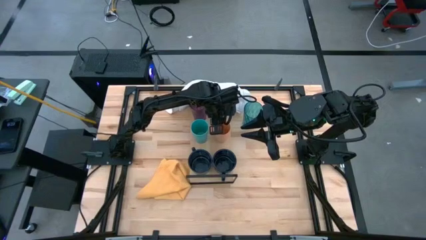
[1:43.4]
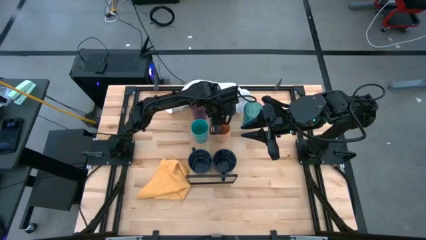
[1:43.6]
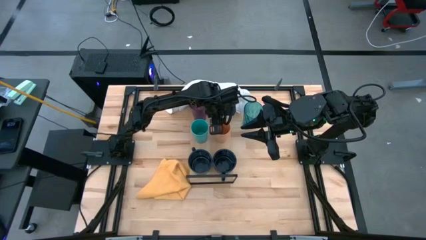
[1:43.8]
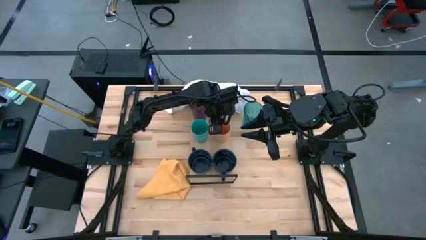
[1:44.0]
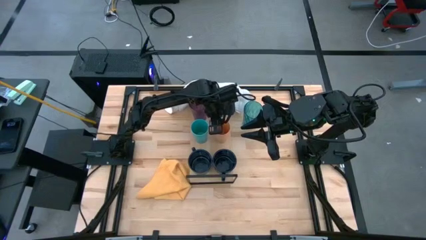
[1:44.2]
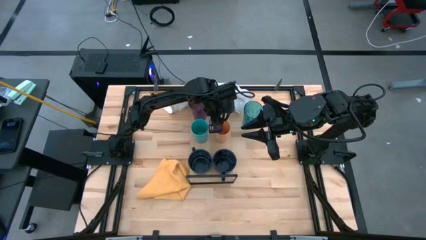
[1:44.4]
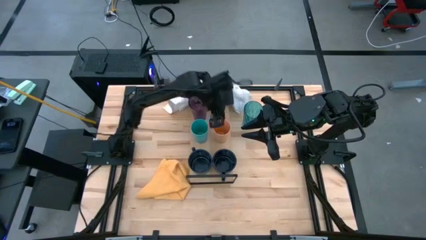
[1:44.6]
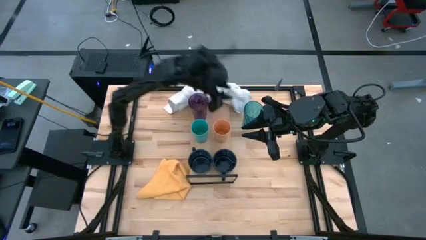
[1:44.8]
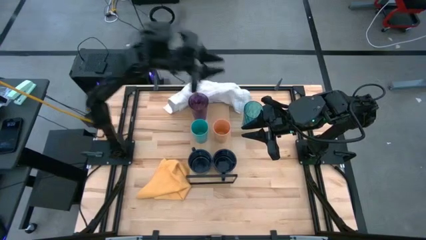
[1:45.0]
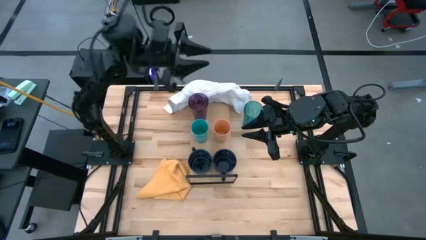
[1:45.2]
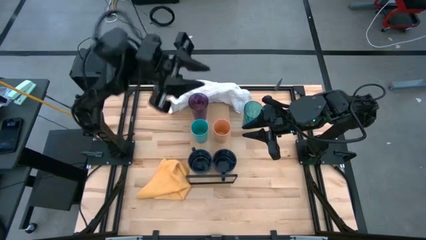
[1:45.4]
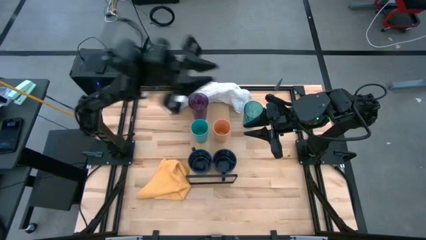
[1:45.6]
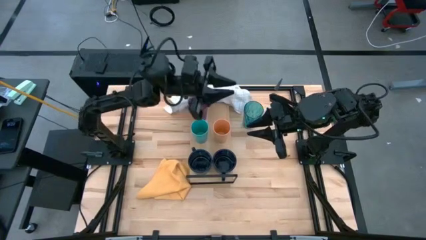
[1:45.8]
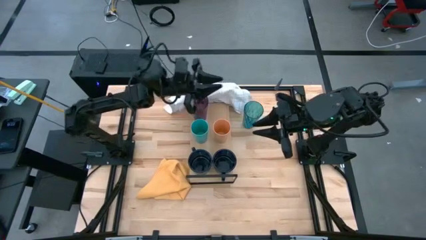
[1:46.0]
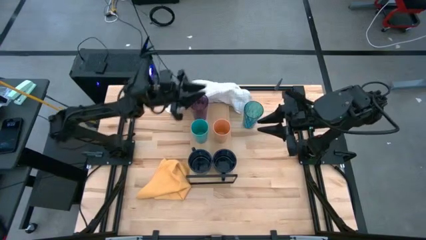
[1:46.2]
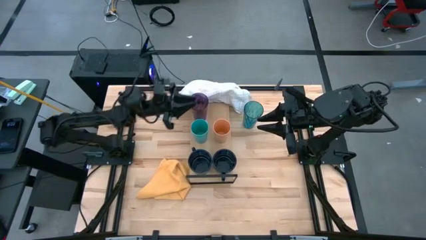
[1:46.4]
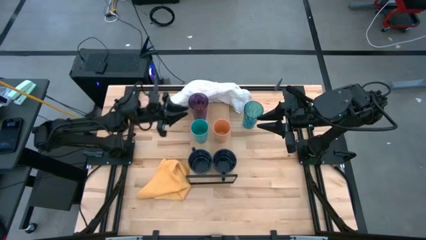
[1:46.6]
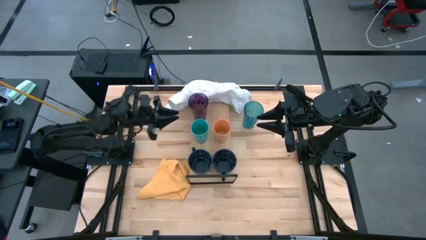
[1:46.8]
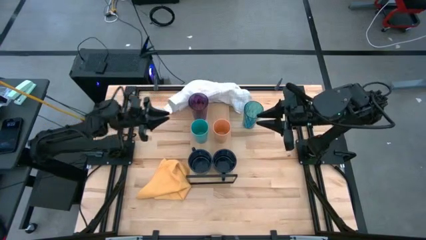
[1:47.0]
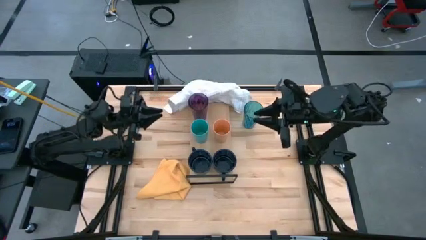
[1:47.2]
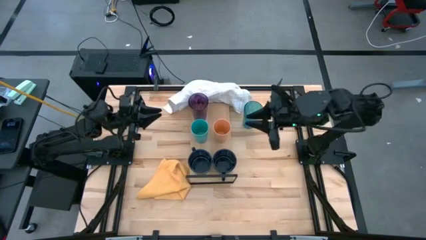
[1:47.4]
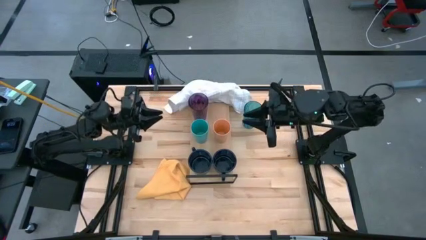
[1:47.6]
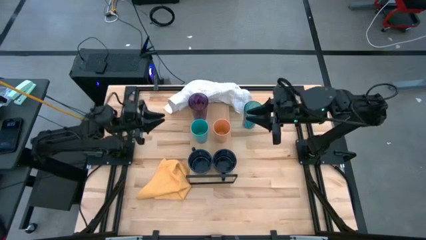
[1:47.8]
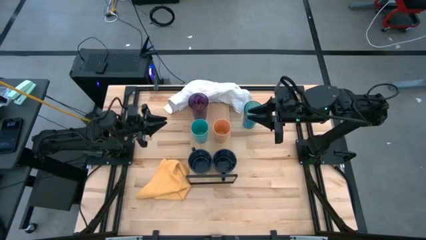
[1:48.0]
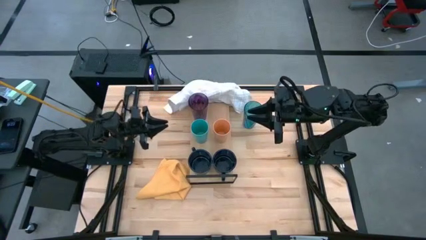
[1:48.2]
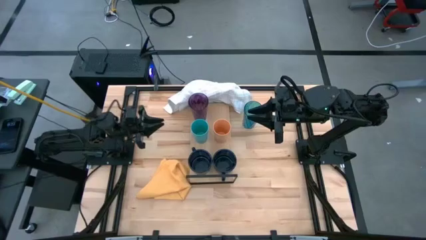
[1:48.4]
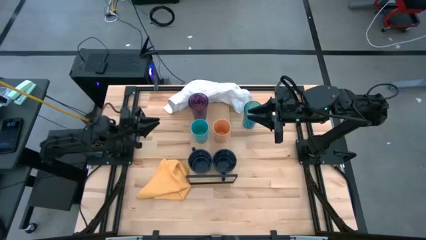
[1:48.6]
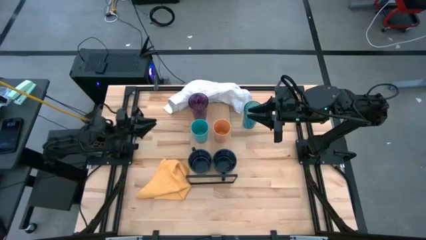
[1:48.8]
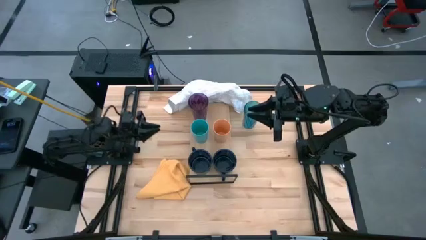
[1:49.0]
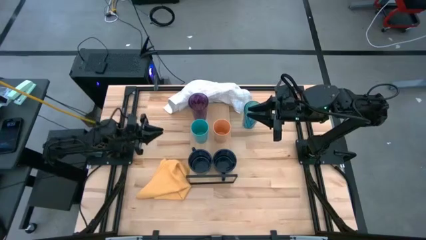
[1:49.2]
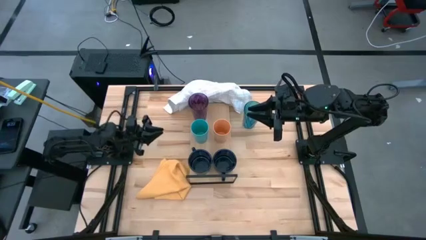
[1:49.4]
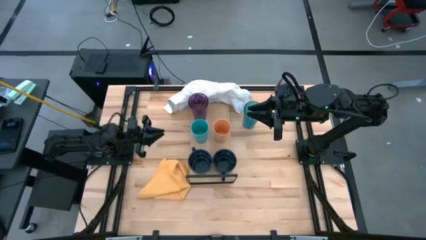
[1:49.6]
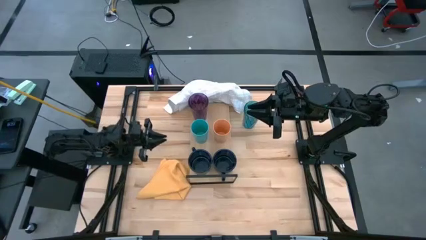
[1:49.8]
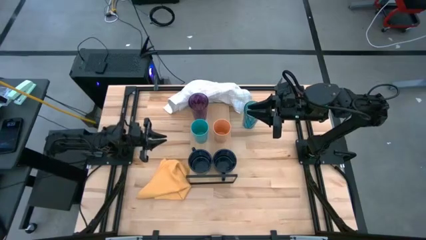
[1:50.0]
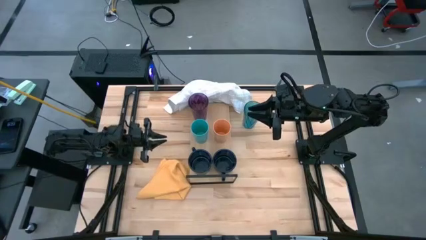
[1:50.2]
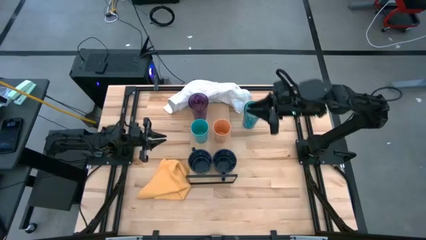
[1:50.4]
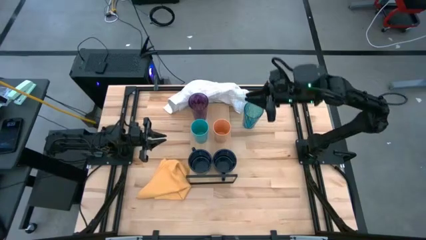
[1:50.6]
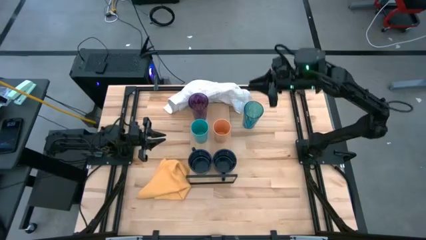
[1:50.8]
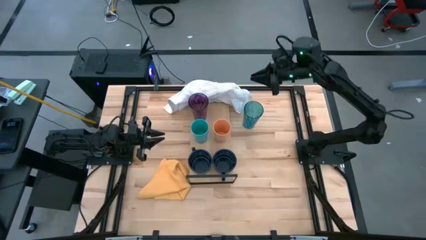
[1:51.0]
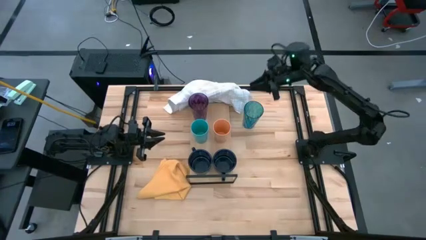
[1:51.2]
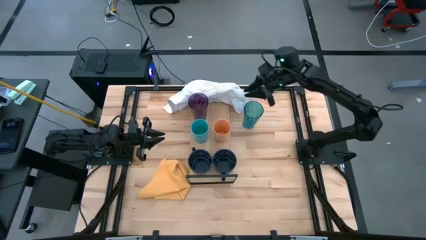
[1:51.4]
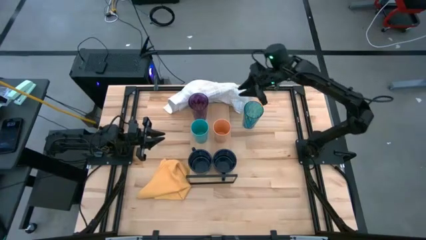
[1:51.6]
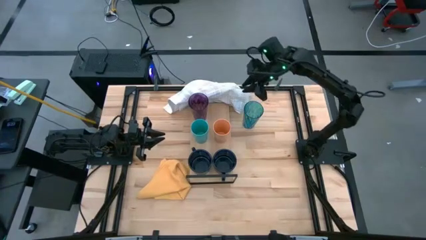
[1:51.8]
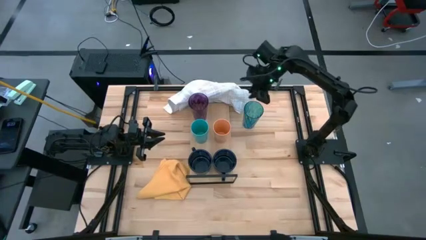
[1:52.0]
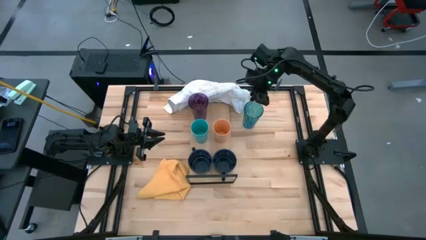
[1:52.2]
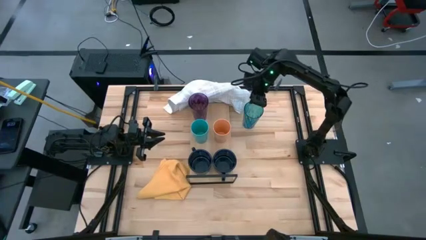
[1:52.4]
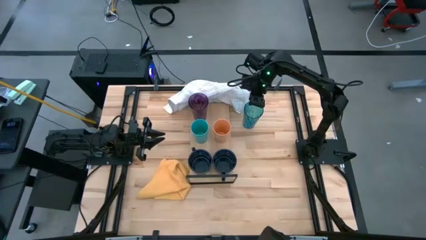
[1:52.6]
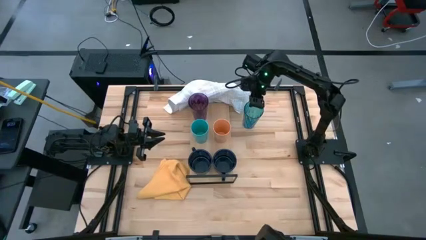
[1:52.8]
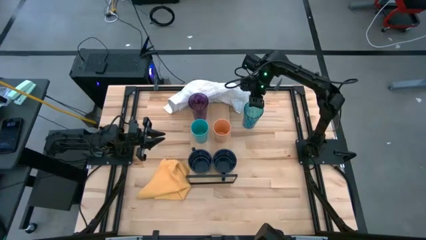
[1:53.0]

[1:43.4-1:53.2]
Task: Stack small to large cups/mugs on shelf
Put the blue cup on the shelf

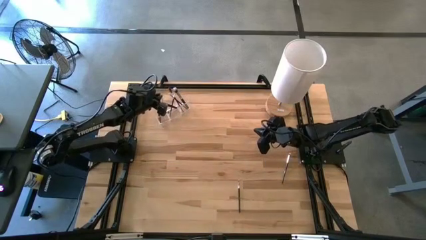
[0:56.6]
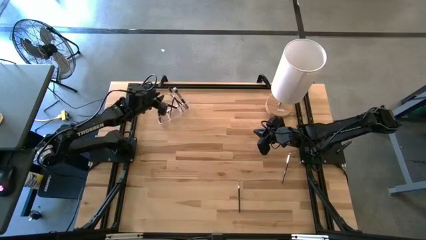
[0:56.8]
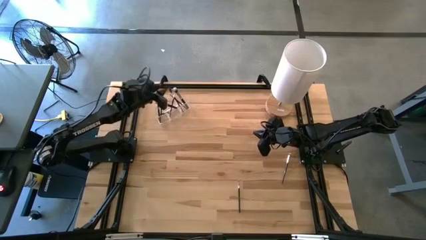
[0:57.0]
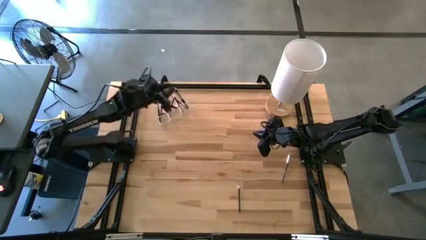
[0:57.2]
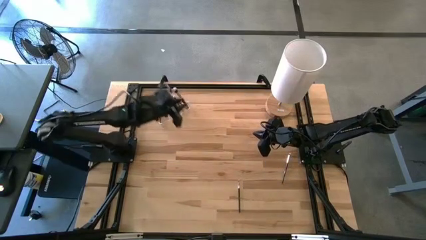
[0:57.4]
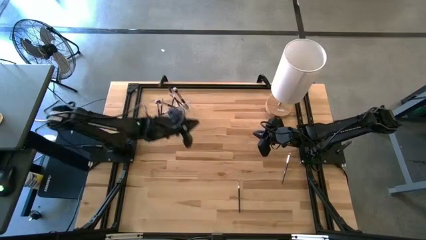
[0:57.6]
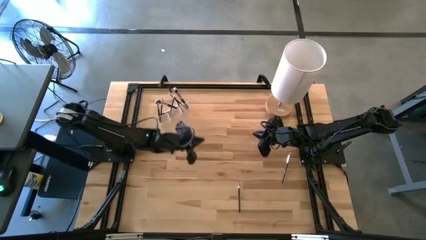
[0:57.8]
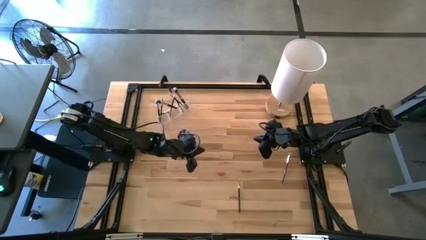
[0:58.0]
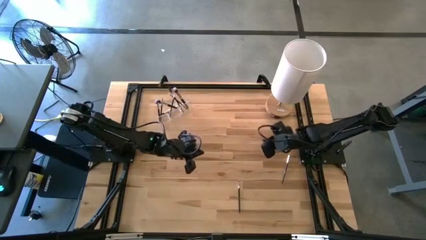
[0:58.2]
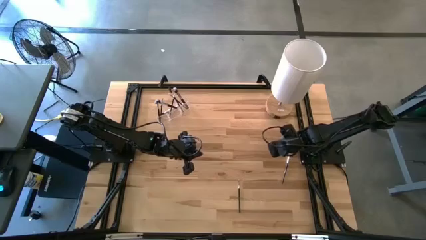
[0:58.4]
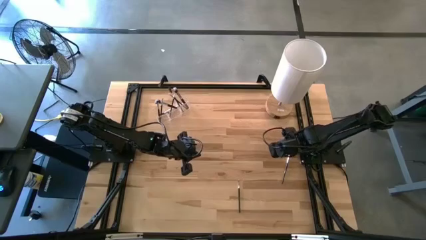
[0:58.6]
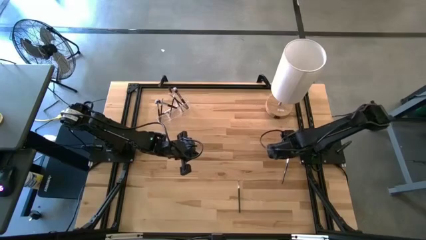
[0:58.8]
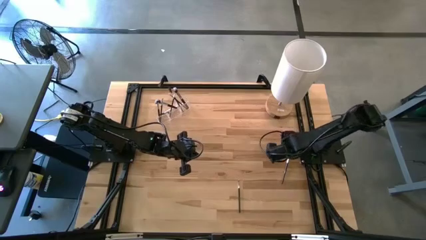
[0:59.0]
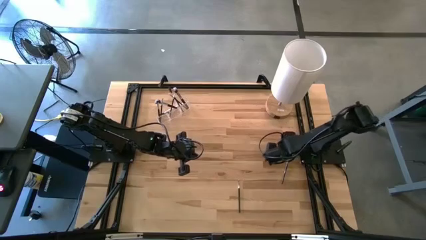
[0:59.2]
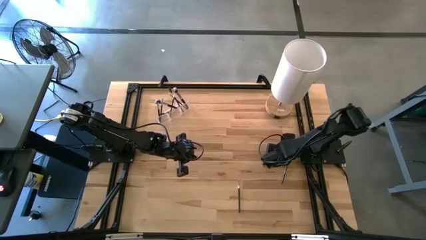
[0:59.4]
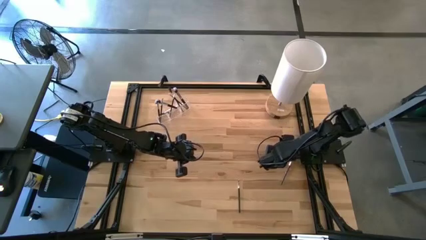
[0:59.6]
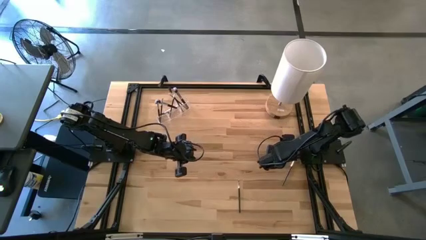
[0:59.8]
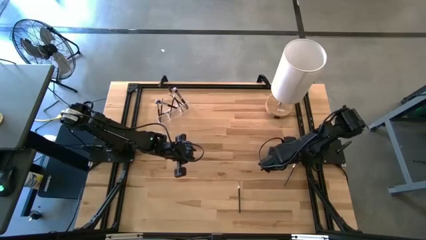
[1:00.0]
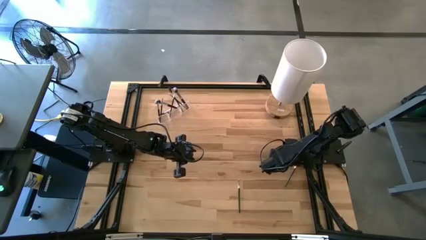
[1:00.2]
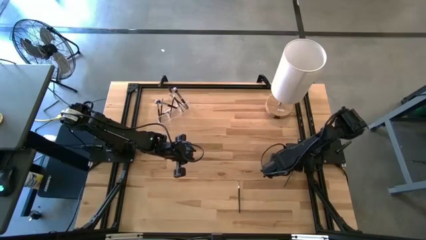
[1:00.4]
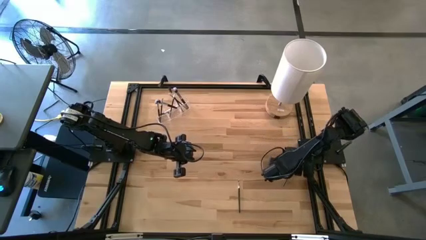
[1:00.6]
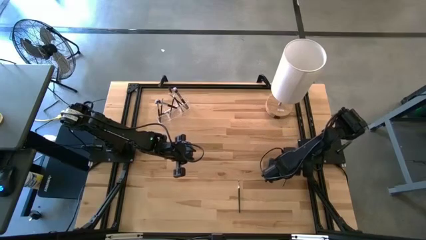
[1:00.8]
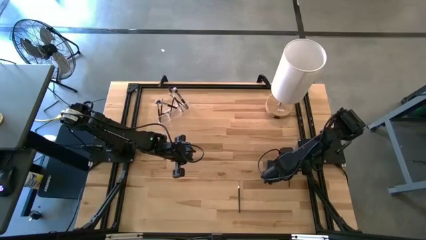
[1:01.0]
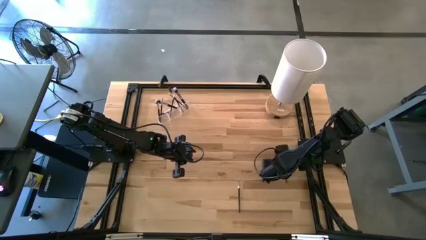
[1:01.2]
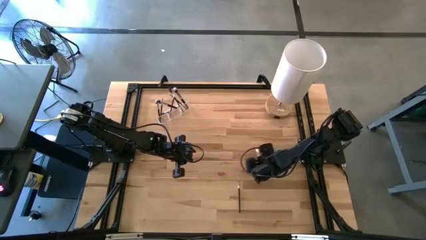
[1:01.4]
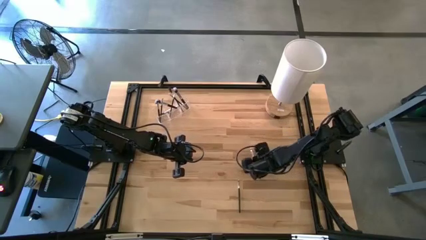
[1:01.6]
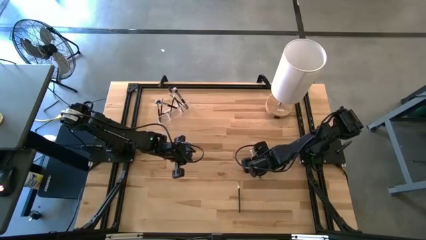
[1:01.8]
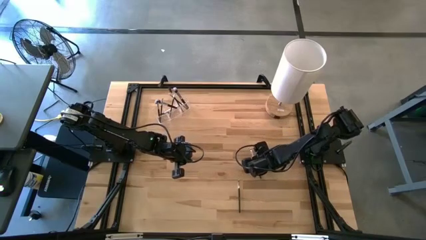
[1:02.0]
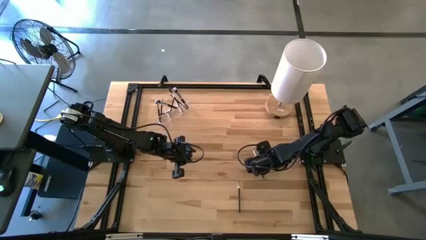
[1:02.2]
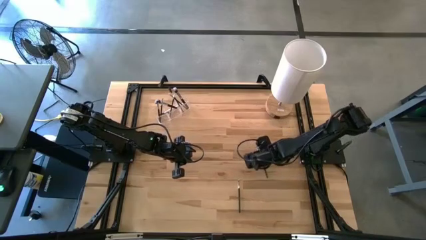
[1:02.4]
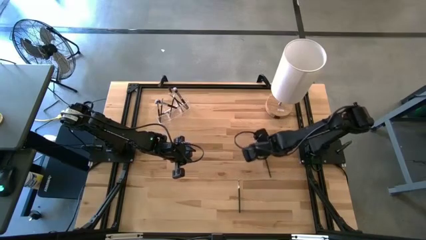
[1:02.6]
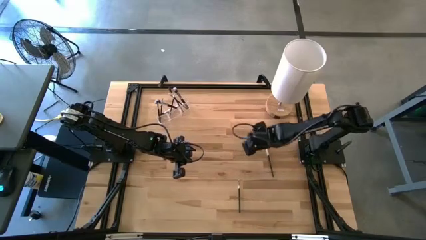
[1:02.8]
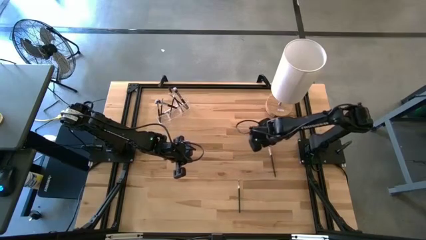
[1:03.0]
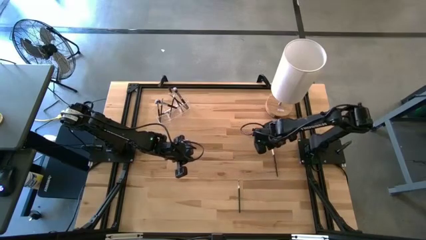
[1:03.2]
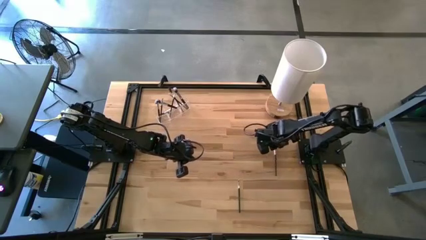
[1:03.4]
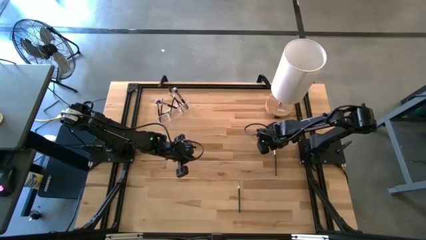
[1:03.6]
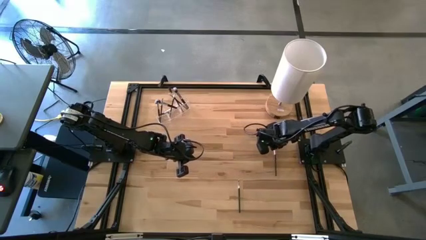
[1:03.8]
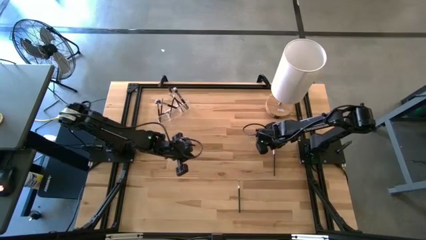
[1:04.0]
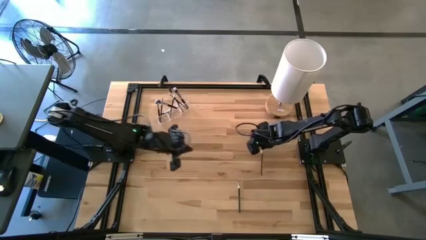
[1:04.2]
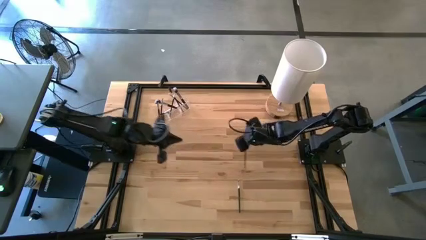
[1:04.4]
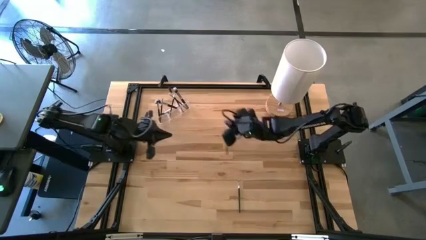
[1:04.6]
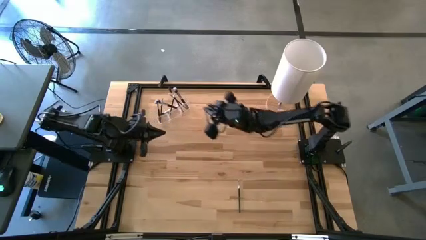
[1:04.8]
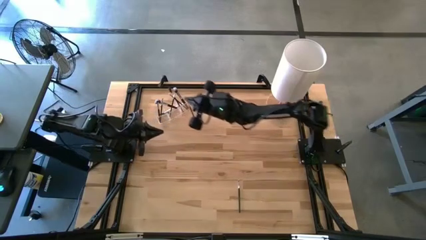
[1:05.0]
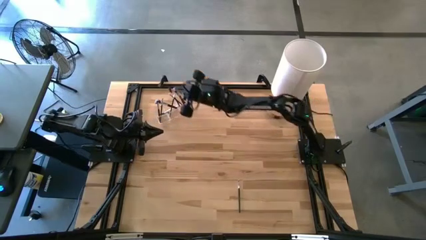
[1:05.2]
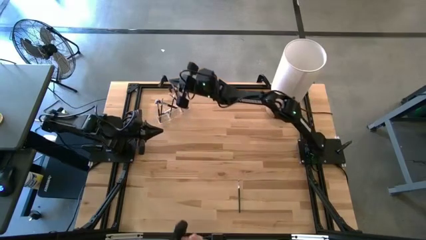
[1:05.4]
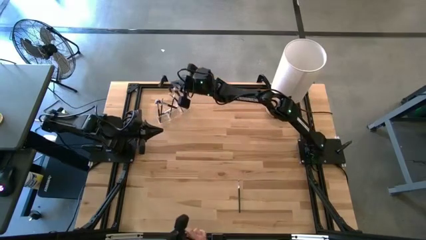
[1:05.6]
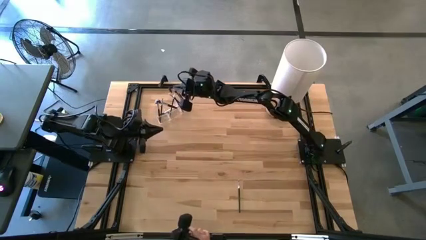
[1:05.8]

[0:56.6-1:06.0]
Task: Put items in baskets/containers
Put the eyeshadow brush into the transparent organizer
